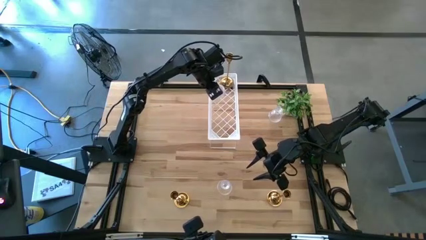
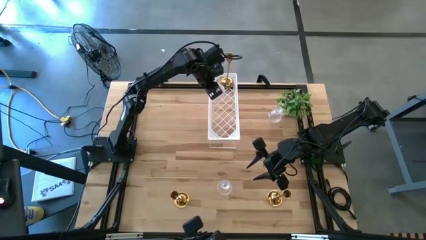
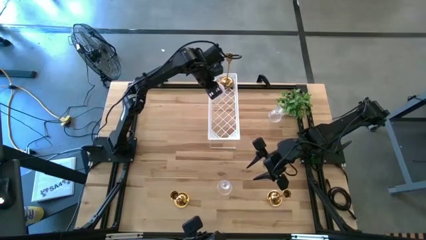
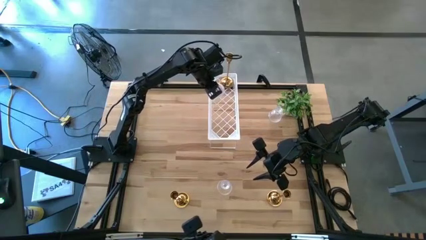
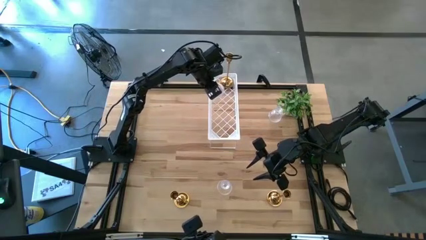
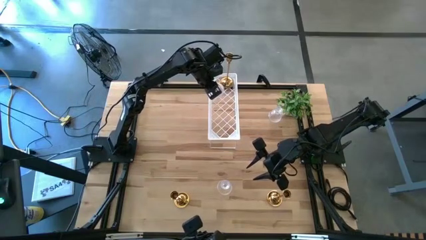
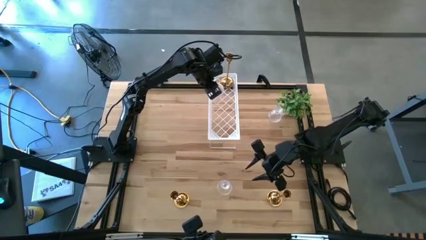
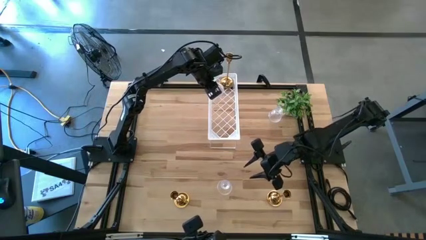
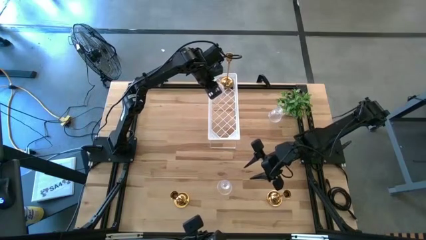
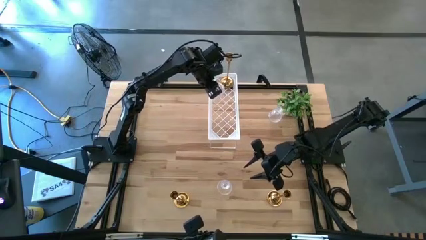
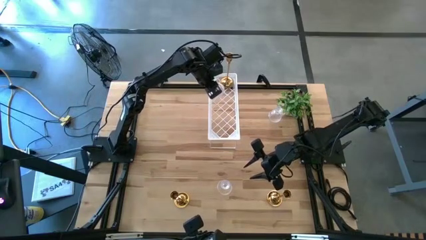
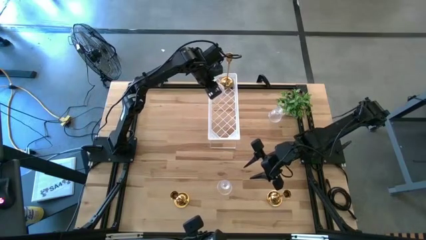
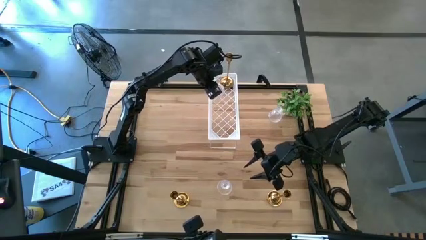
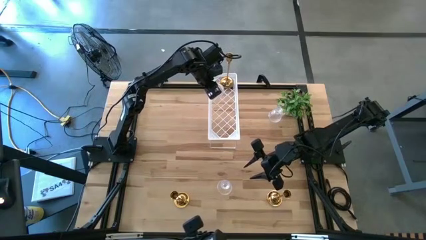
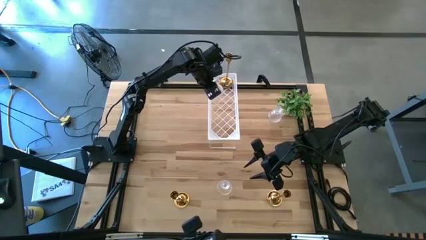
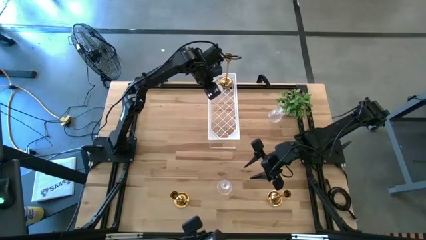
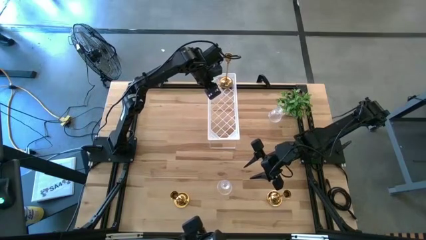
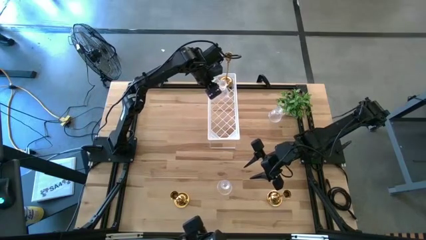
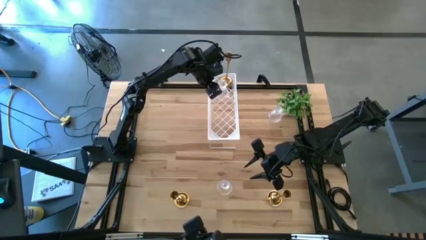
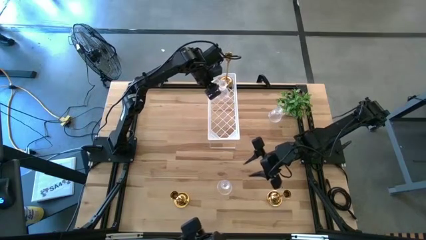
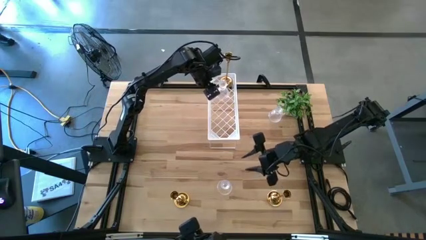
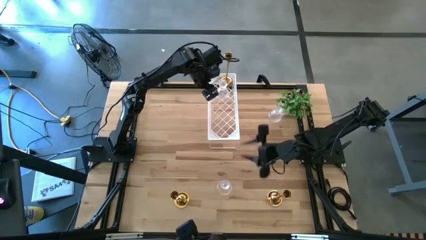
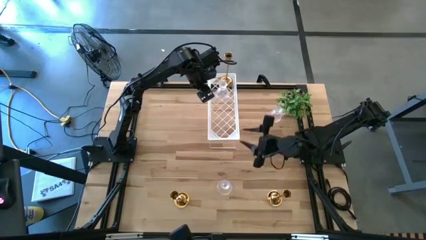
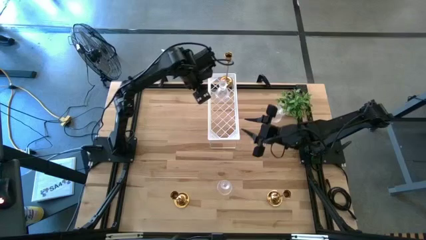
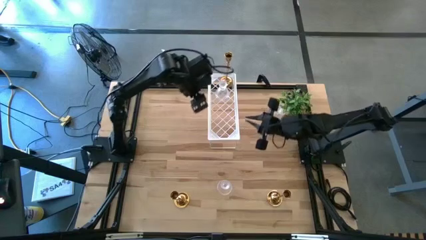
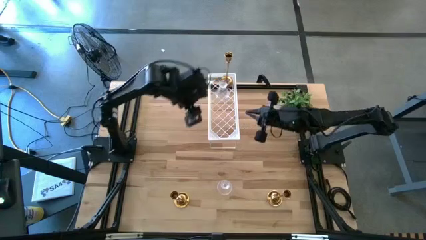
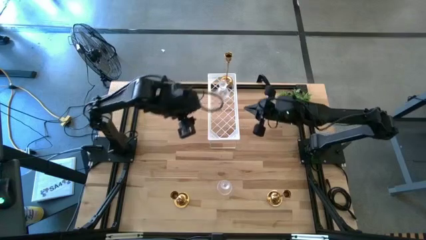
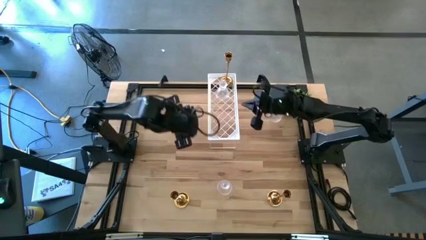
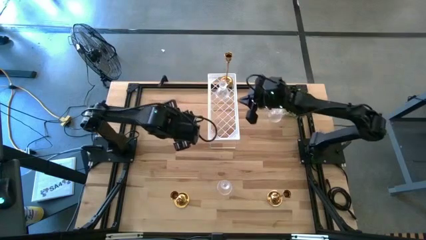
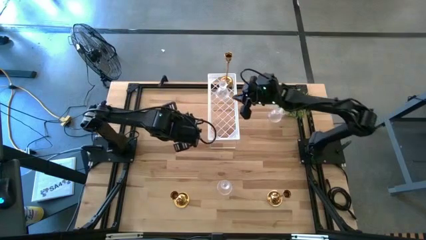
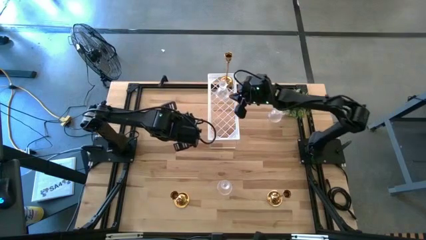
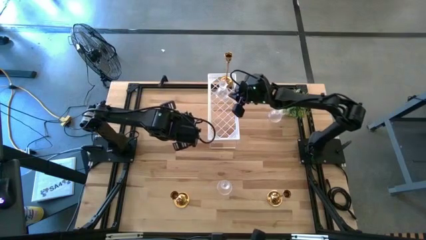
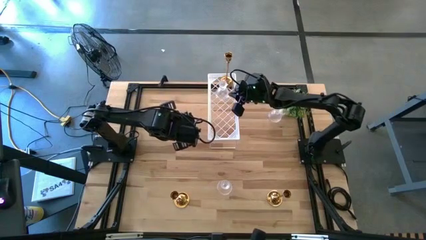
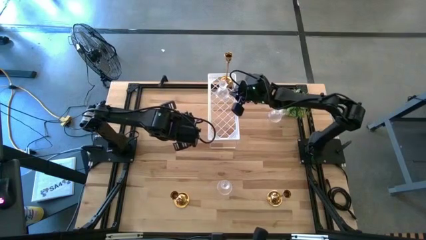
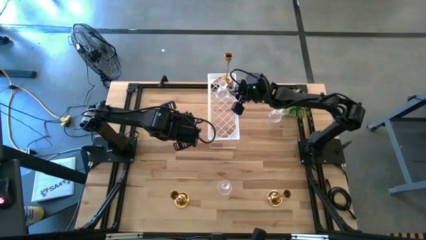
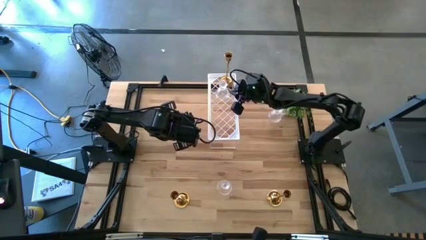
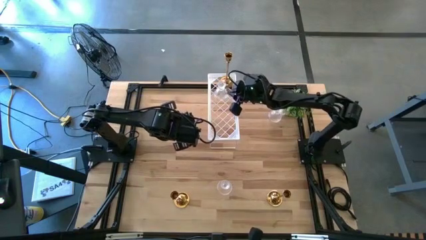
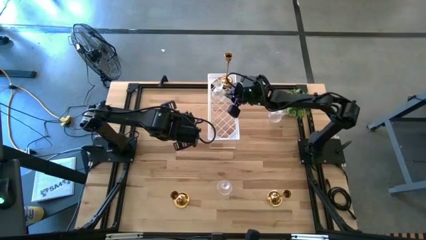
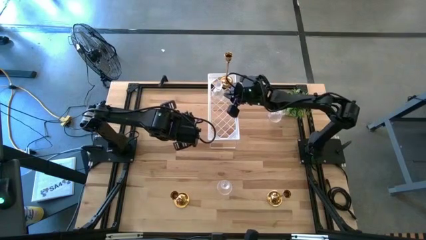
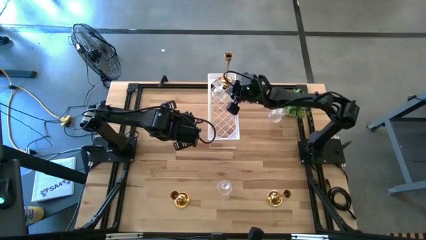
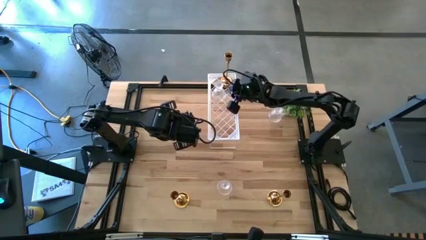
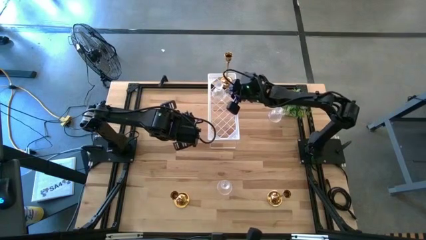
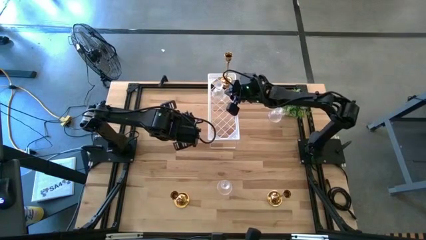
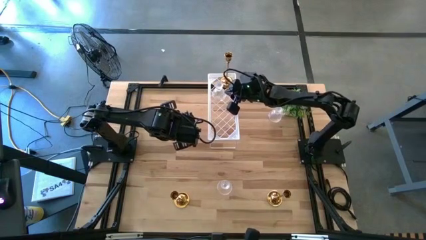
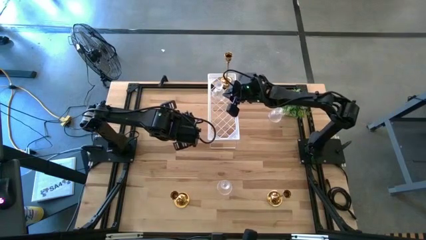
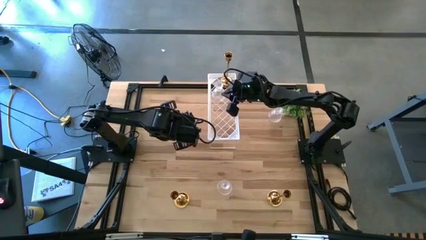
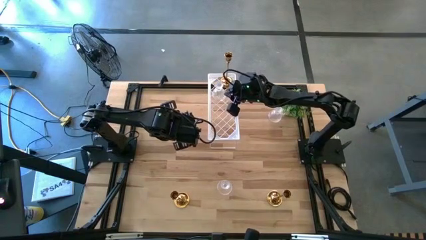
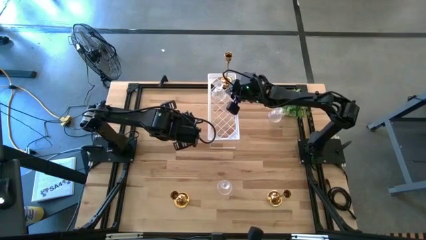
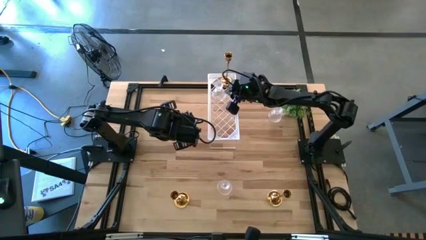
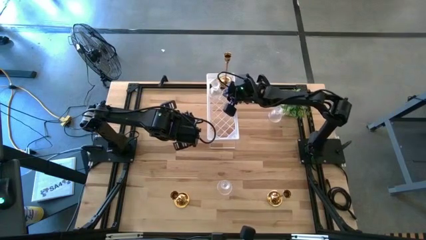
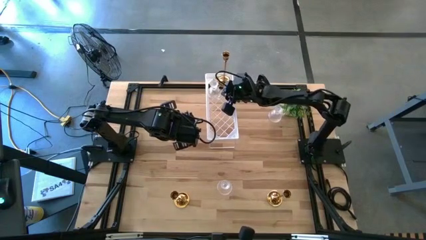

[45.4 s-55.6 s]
Task: Pick & Place candle stick holders
Put the left transparent candle holder on the shelf
